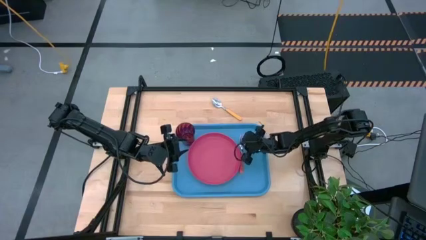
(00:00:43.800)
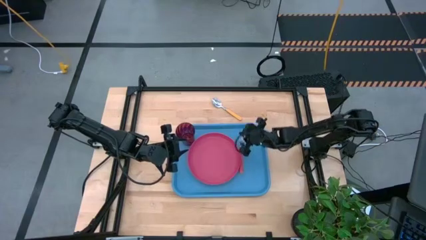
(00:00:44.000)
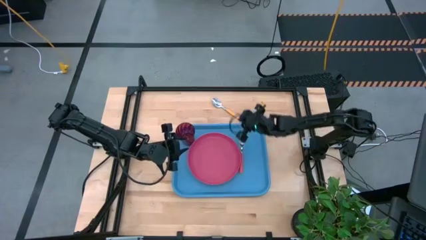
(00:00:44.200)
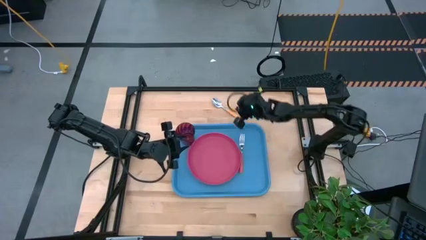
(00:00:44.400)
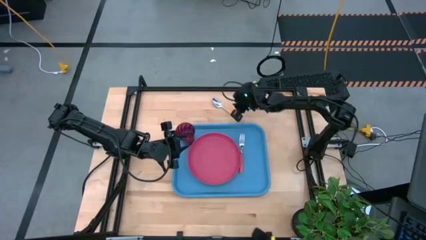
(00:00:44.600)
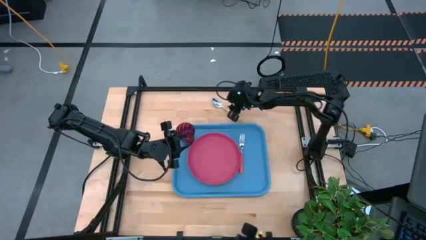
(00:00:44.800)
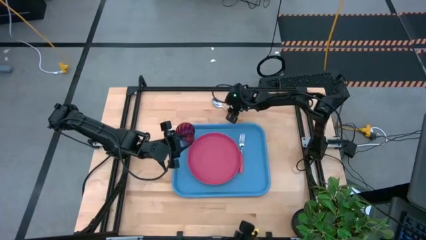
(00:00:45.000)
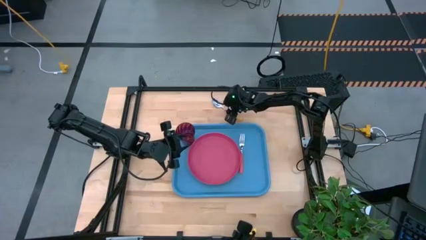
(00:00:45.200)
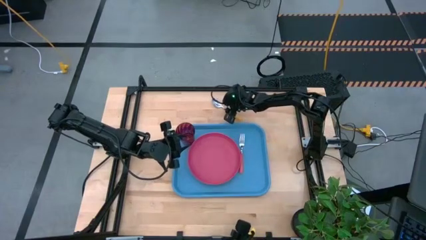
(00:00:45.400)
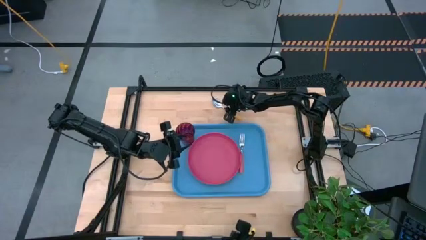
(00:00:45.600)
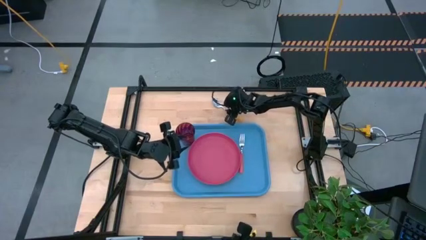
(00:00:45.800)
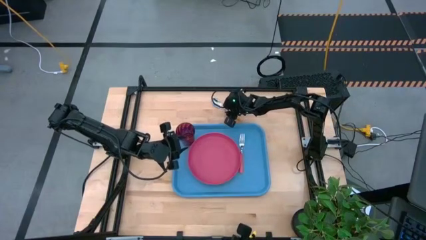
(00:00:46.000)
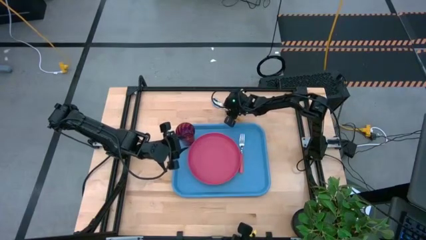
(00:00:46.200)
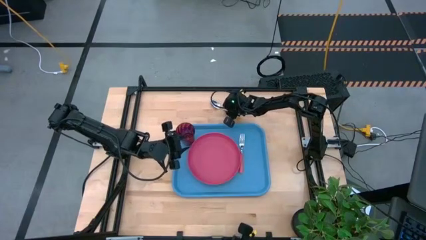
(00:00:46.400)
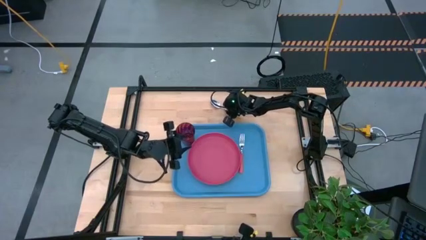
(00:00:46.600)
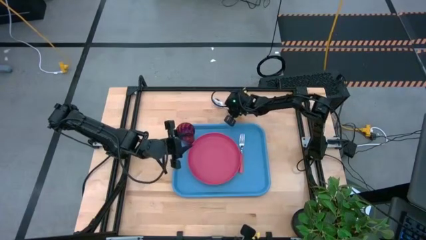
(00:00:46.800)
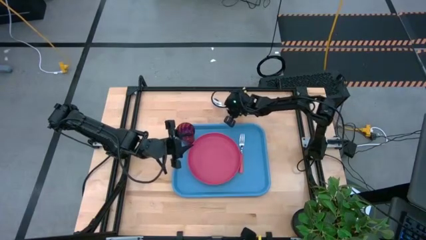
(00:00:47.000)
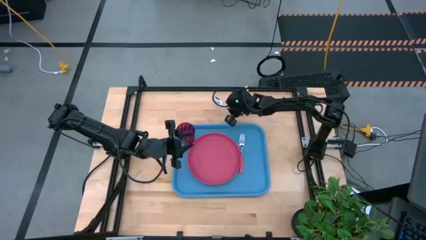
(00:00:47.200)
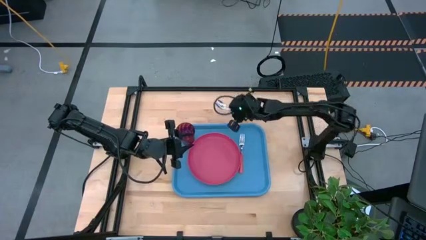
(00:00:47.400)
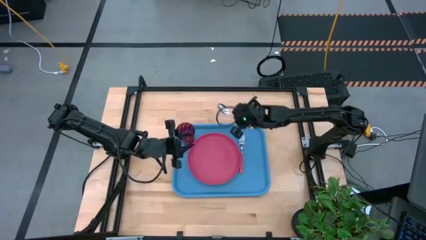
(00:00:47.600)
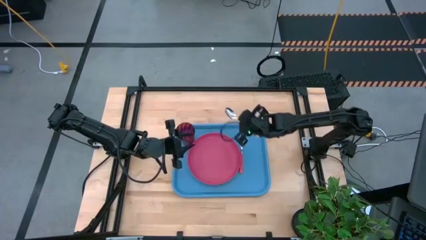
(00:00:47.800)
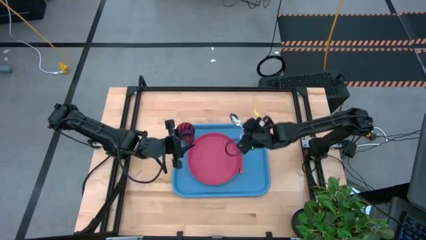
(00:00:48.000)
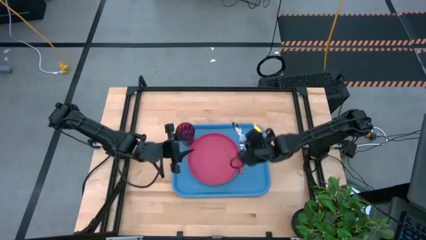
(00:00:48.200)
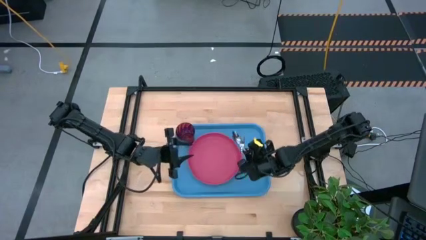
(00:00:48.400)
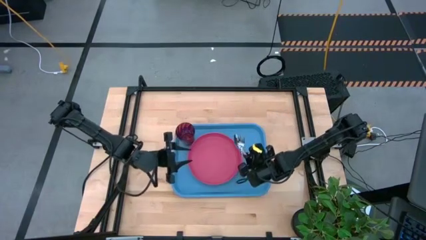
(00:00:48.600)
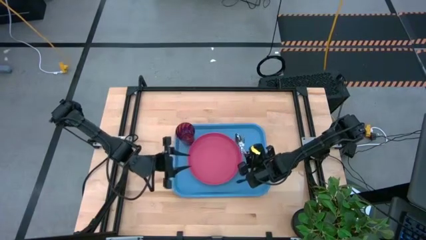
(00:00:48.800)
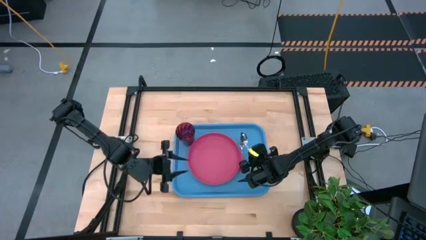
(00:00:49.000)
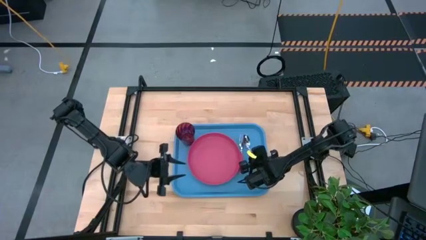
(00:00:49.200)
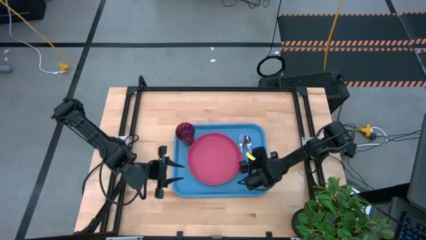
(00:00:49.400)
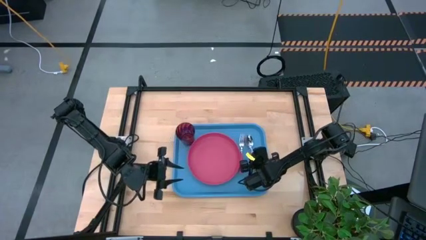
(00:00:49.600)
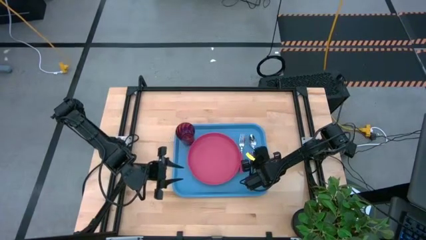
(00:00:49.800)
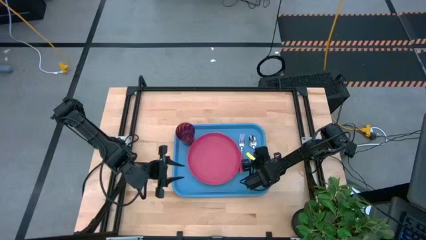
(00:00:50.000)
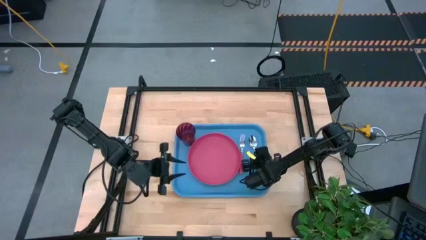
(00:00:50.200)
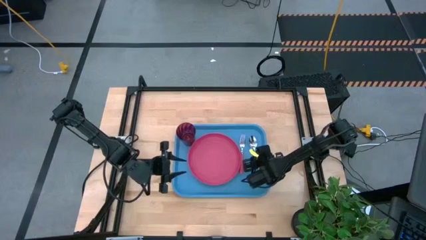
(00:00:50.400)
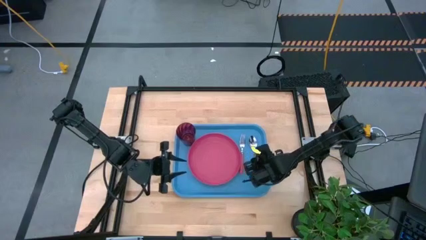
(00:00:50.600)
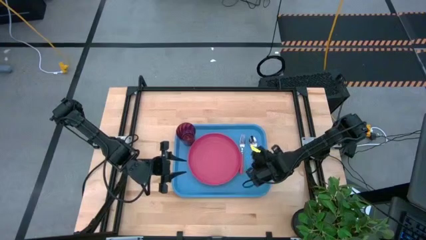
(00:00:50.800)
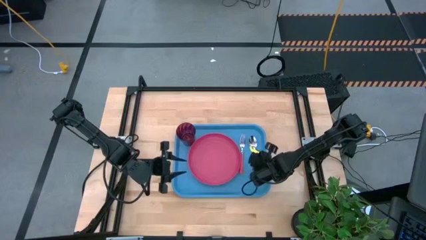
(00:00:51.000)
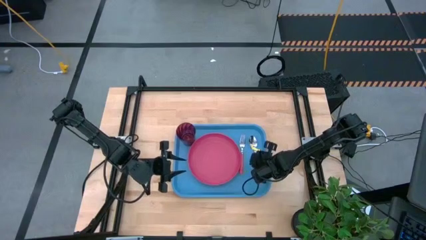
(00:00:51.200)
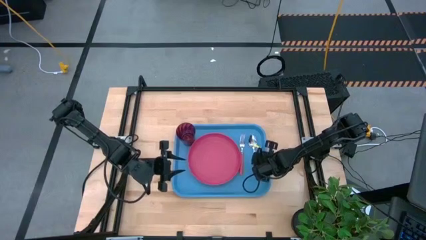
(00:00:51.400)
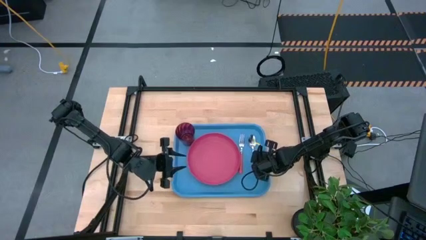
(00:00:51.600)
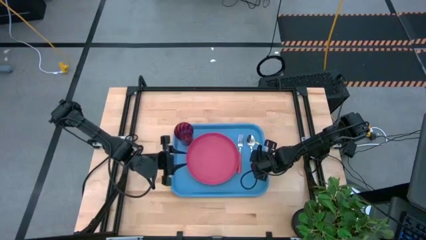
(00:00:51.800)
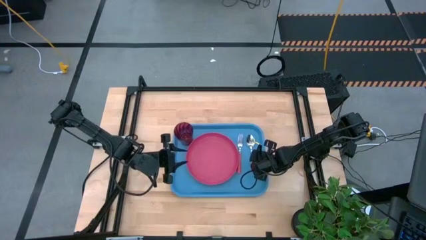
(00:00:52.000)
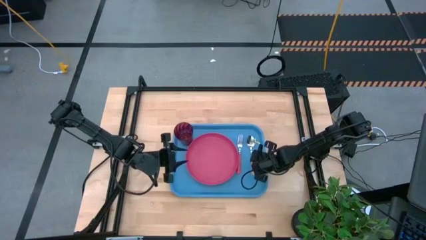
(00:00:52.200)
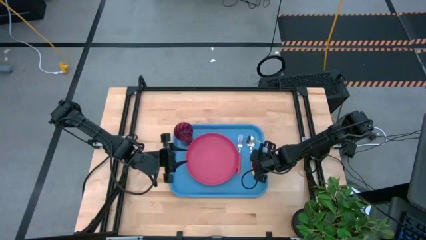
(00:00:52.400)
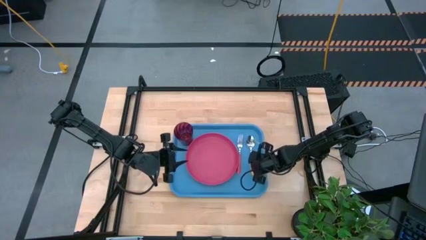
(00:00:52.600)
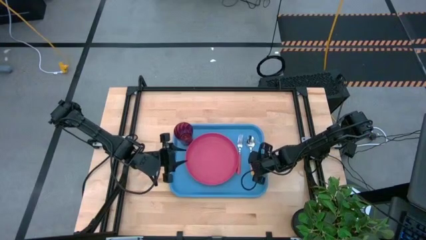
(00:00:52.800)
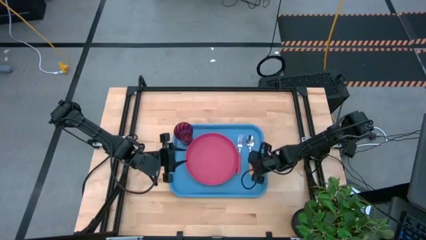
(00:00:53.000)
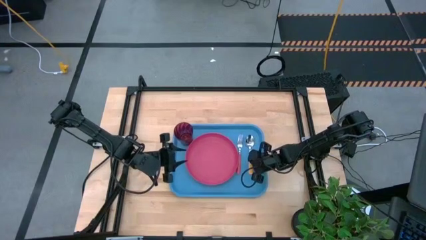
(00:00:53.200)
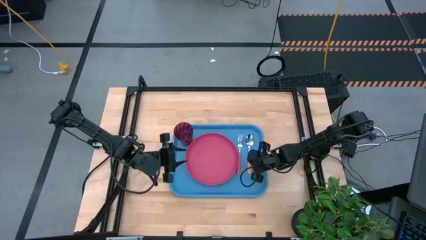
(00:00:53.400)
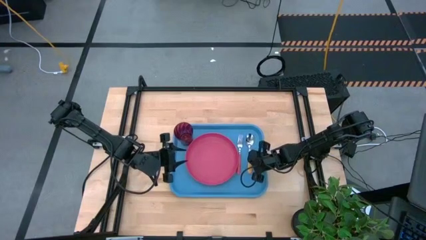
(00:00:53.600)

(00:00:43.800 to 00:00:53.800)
Task: Pick and place plate/cup/fork/spoon on tray
Put the yellow spoon on the blue tray to the right of the pink fork
